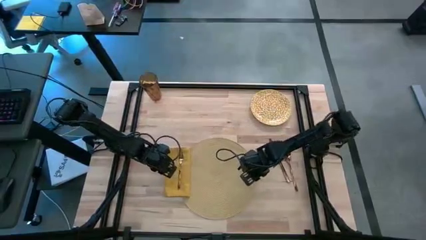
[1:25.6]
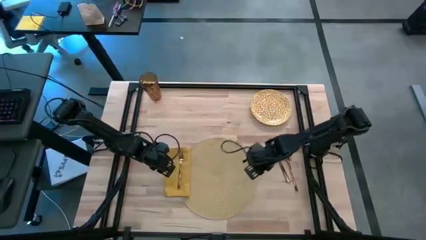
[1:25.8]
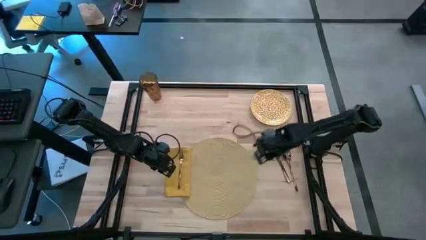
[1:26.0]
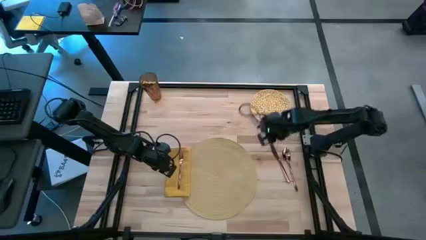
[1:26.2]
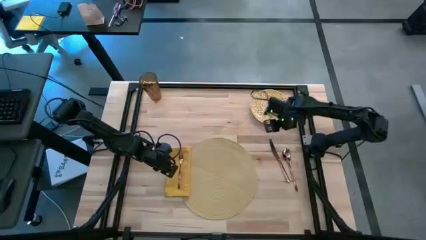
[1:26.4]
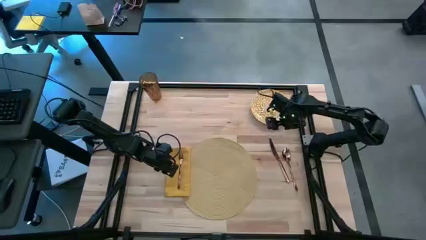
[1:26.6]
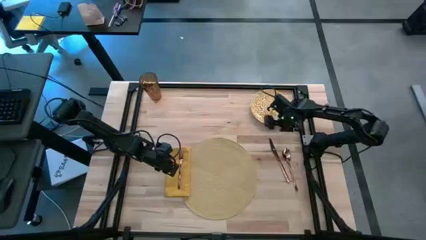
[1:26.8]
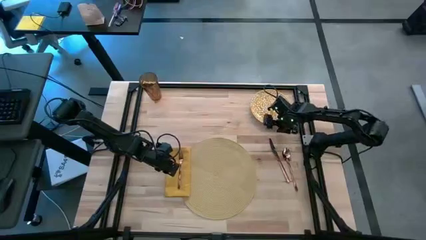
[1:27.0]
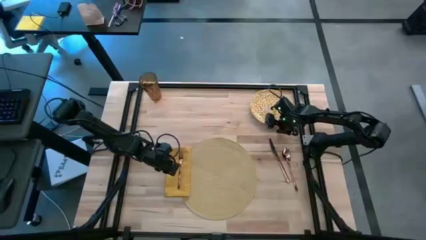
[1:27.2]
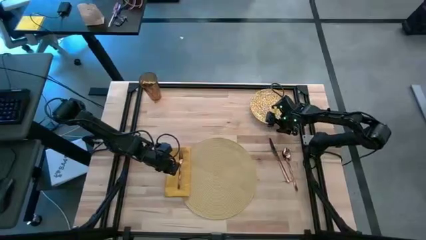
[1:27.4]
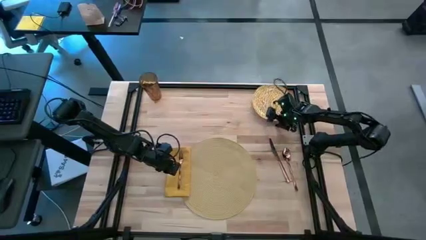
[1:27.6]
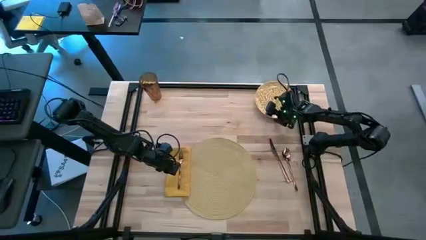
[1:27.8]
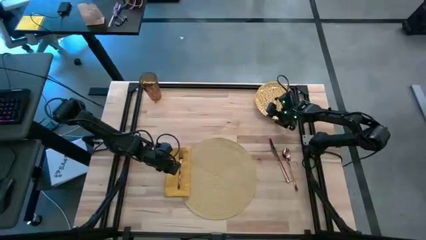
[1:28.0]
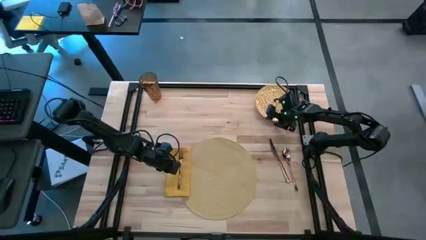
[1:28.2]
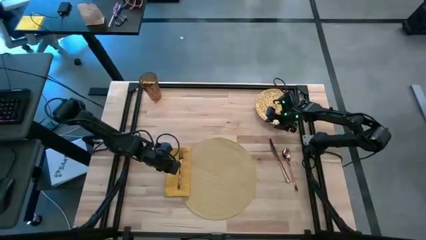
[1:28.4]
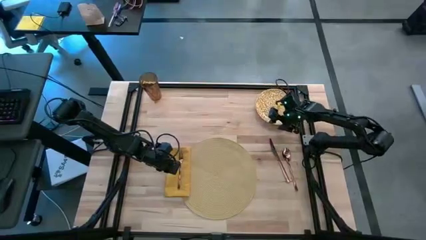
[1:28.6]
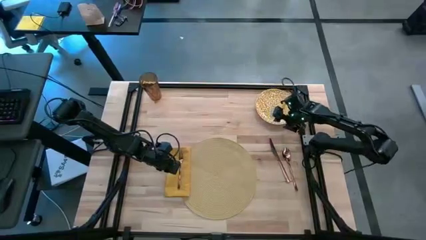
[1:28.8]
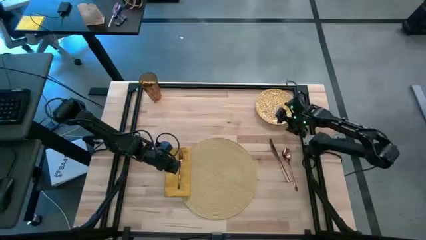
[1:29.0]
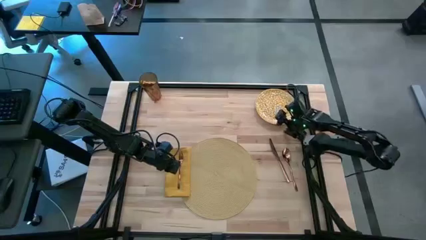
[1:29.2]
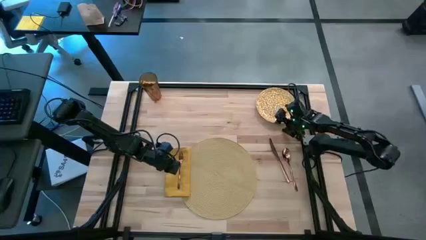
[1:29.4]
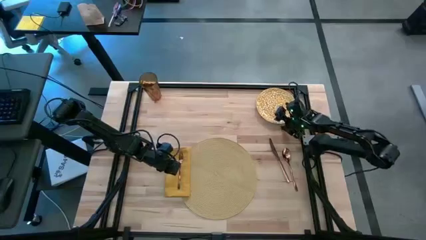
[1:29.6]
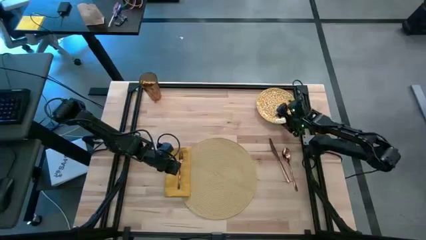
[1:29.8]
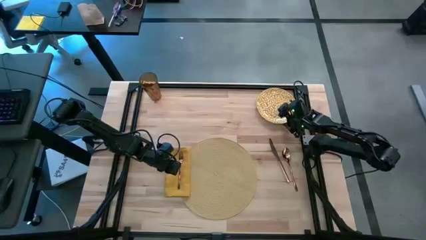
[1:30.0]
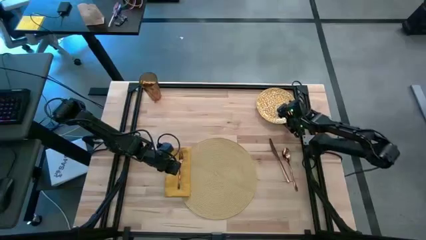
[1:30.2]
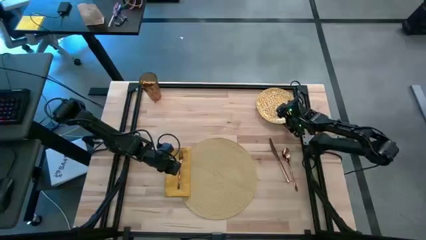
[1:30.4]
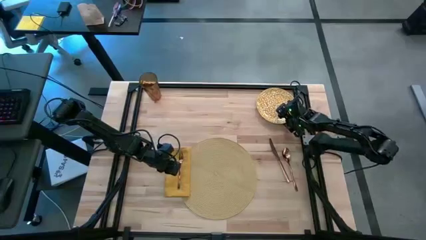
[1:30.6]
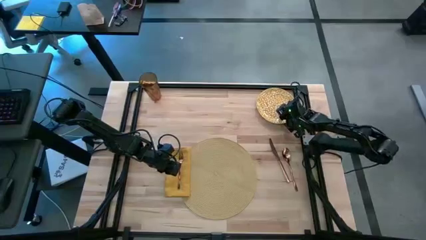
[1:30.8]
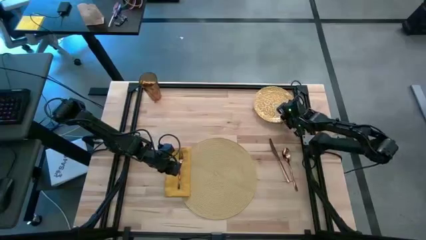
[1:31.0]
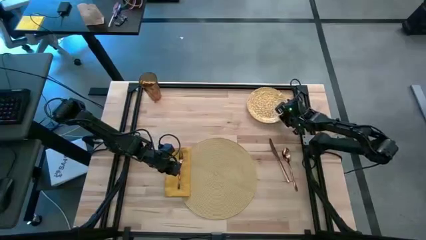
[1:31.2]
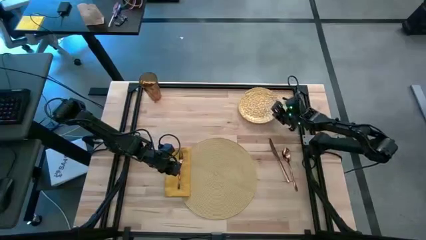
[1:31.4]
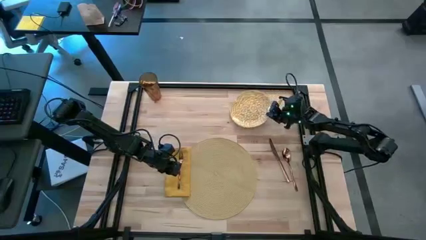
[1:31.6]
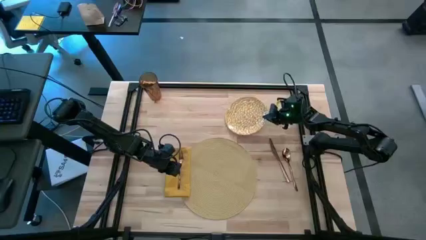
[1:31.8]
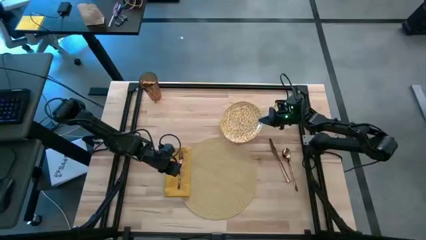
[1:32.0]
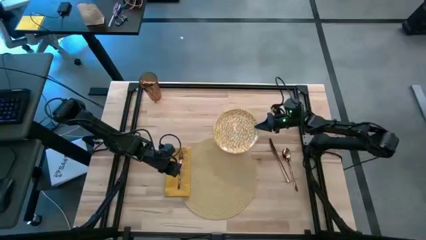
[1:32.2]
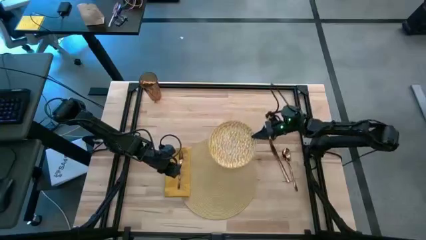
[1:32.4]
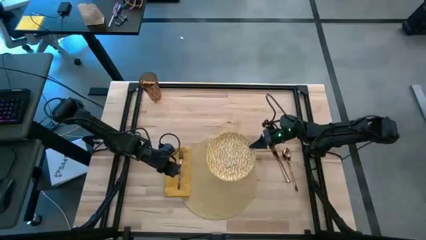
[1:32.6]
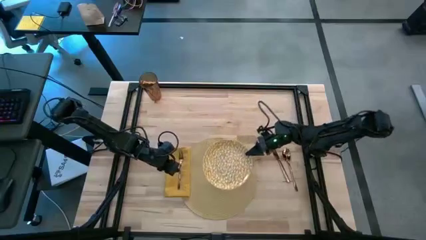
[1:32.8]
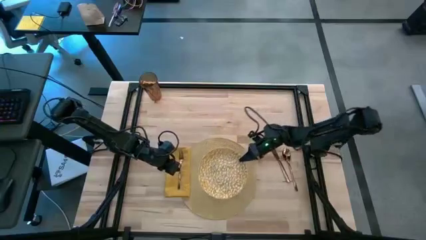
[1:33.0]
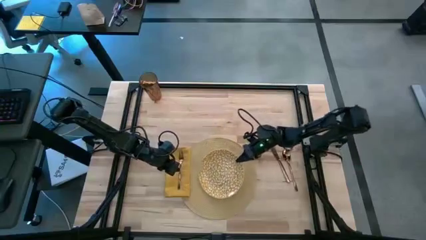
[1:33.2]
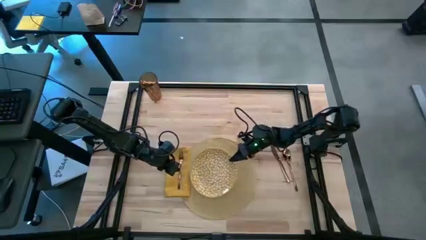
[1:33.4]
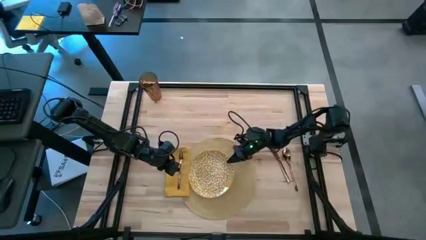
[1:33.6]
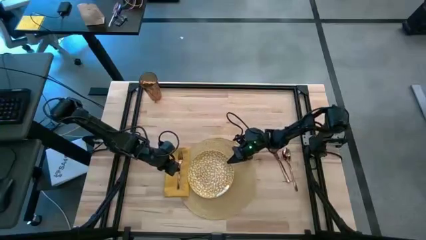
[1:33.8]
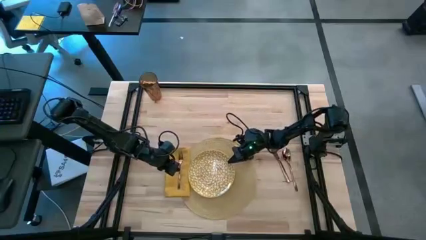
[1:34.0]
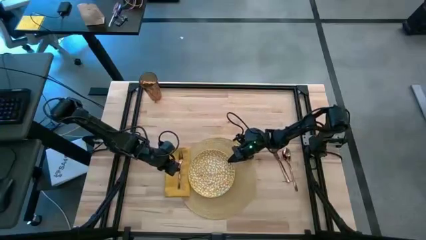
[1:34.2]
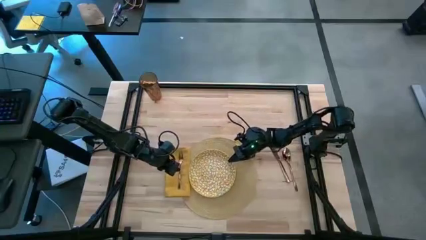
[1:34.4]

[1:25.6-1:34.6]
Task: Set table place
Put the yellow plate to the center of the tablemat

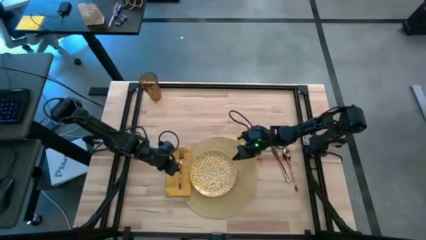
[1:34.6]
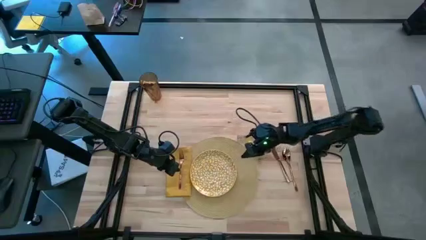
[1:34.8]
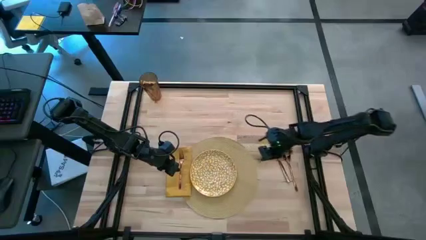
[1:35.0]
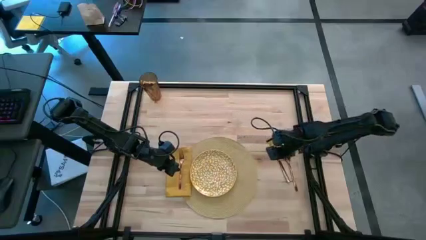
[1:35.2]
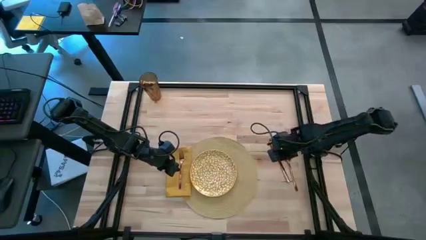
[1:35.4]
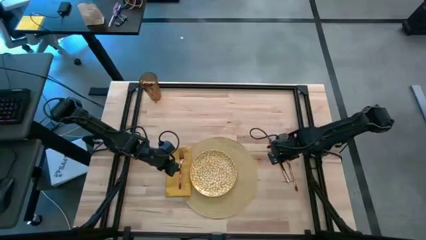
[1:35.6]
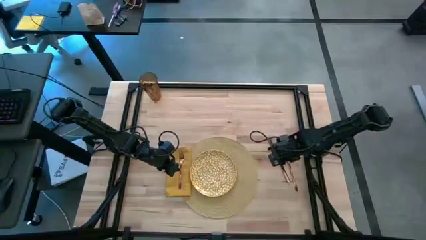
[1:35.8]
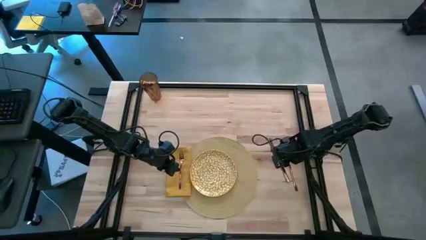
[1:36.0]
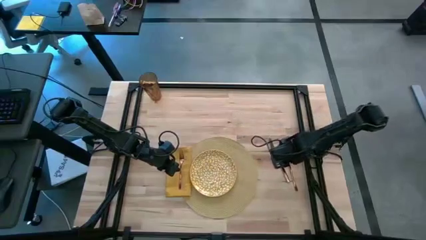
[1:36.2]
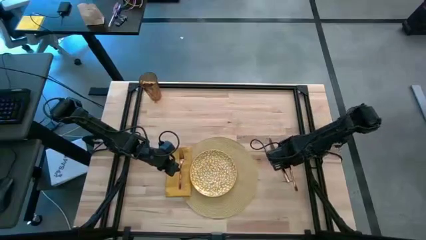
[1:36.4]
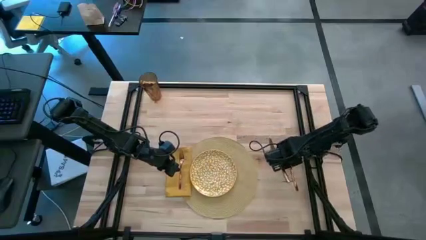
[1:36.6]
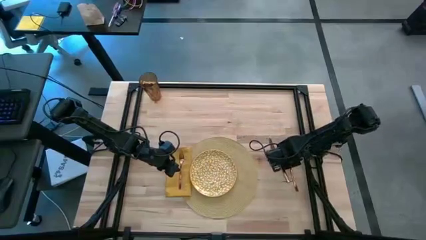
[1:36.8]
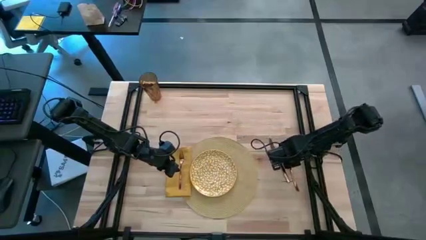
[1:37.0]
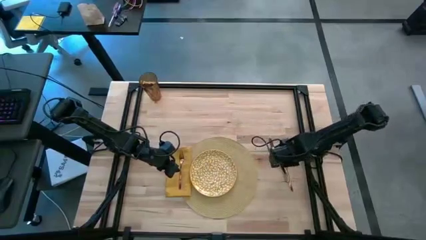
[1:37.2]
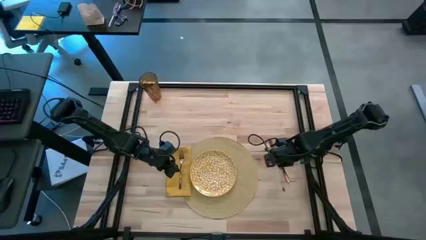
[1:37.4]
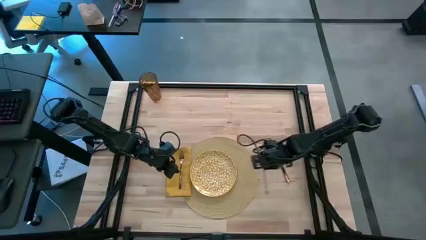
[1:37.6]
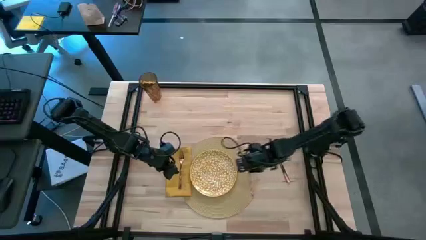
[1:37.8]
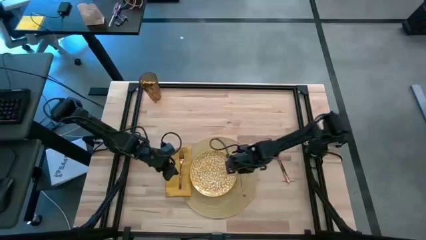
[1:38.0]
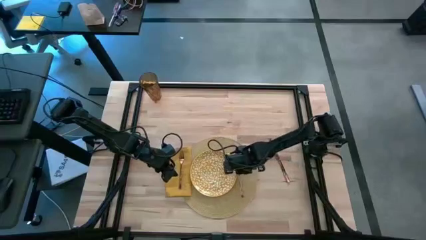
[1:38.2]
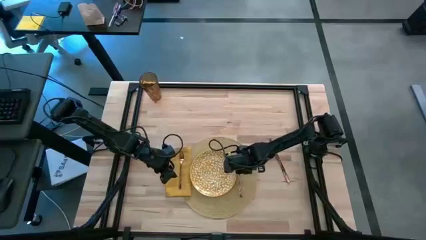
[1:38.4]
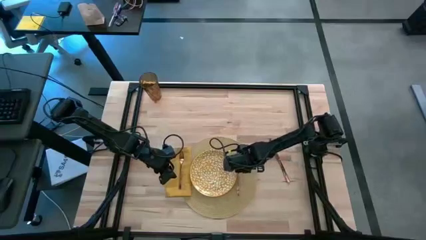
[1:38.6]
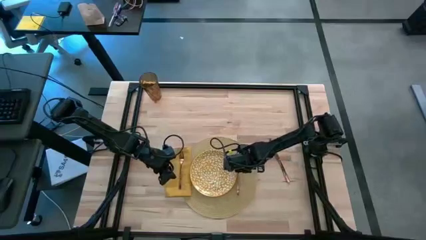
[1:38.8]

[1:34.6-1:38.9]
Put the light brown spoon on the tablemat to the right of the yellow plate

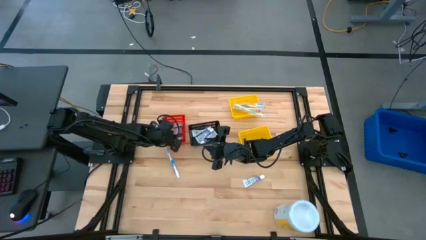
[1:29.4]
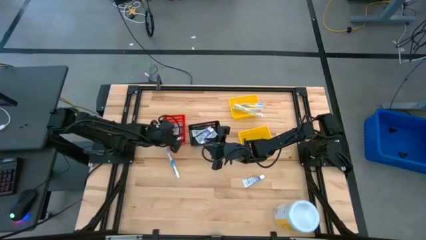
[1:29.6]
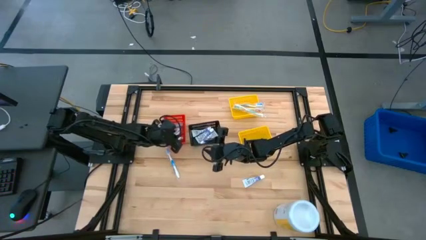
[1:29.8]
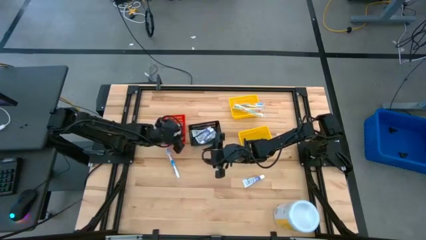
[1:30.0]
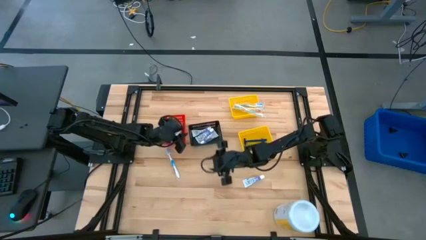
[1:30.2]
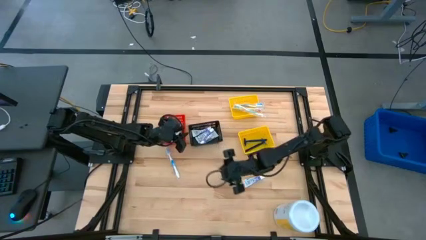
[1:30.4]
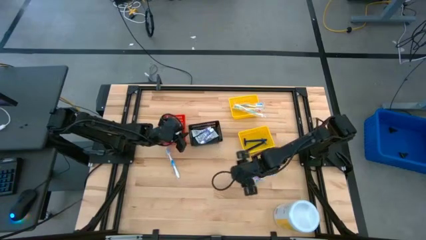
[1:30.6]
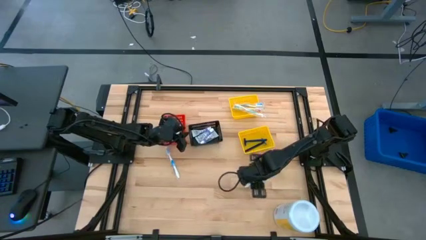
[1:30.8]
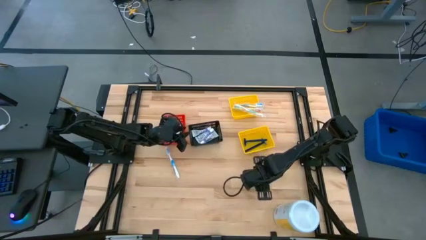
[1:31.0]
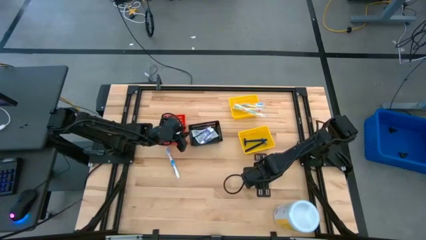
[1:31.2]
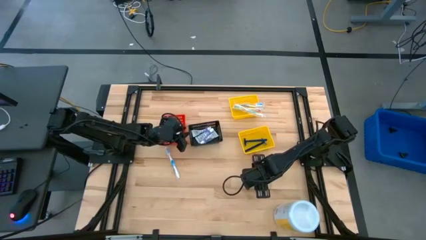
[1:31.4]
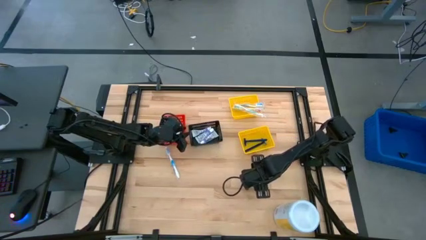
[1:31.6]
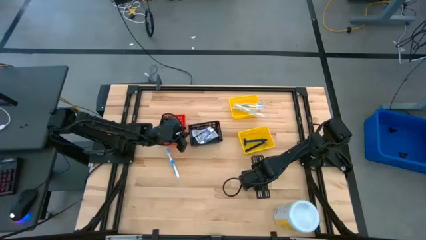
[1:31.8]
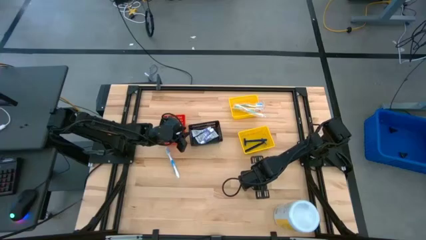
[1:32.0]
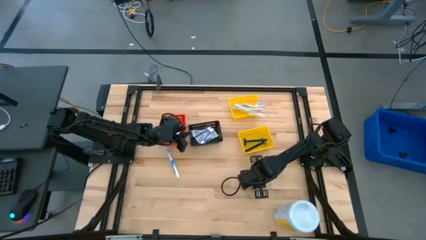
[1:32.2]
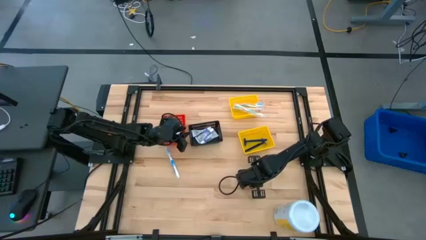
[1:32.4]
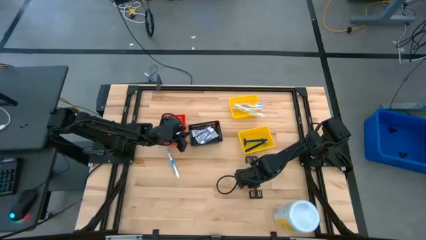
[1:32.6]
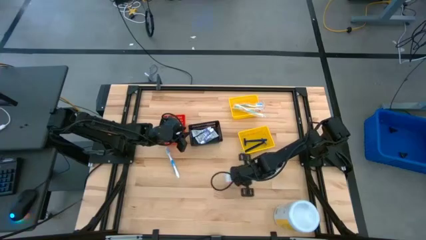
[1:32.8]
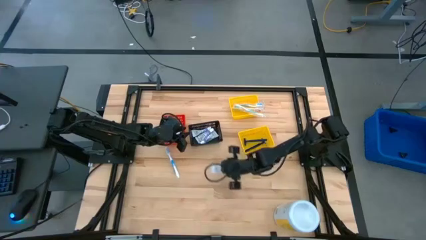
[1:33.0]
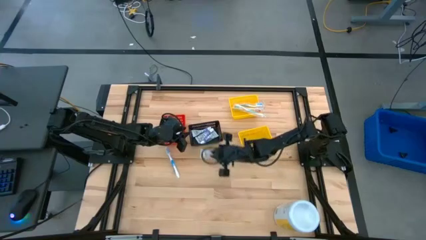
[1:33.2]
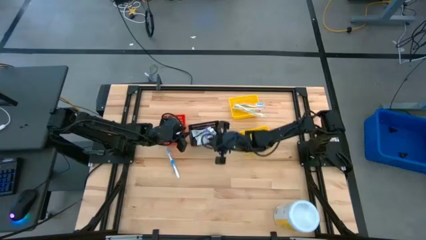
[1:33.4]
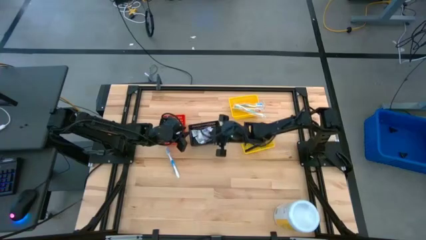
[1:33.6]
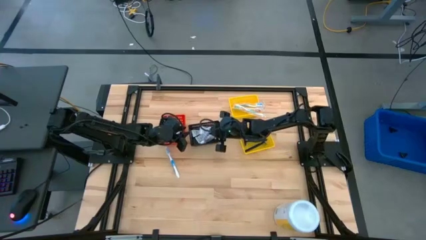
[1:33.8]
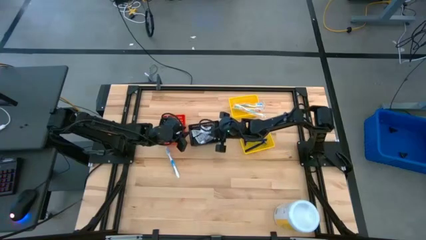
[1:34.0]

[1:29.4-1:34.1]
Task: Pick & Place Travel size toiletries
Put the white toothpaste into the black bin
